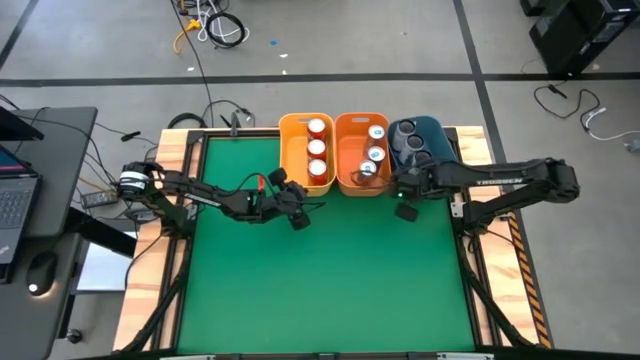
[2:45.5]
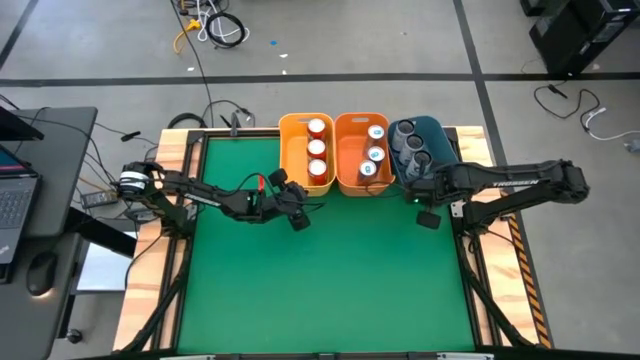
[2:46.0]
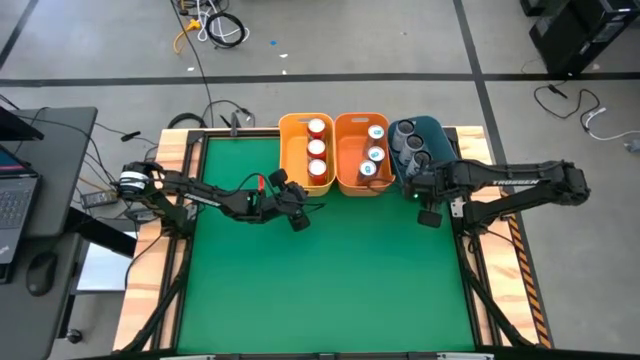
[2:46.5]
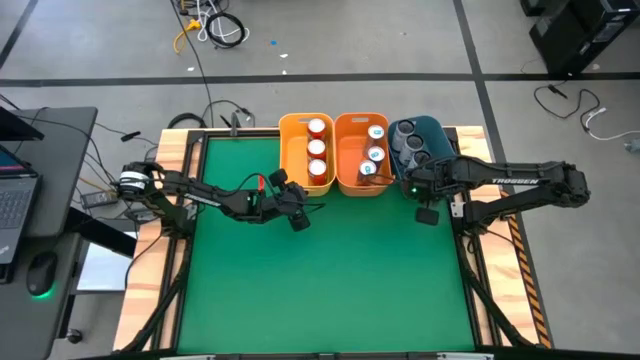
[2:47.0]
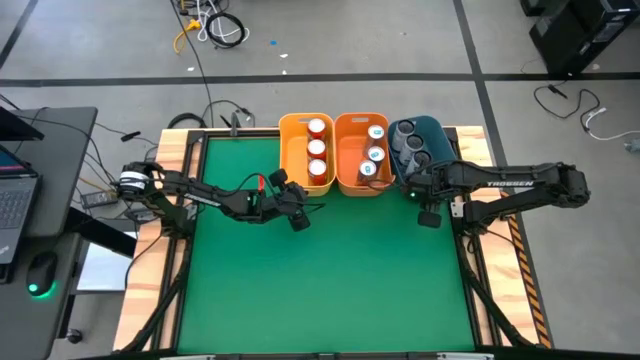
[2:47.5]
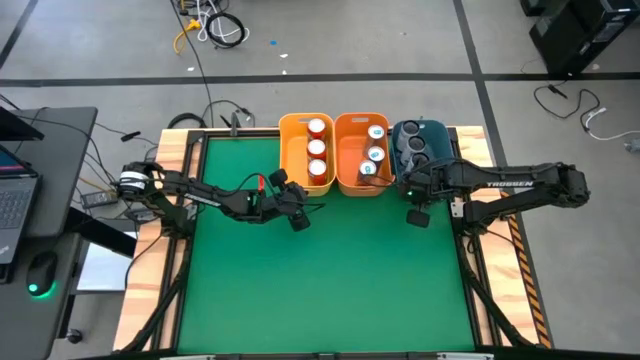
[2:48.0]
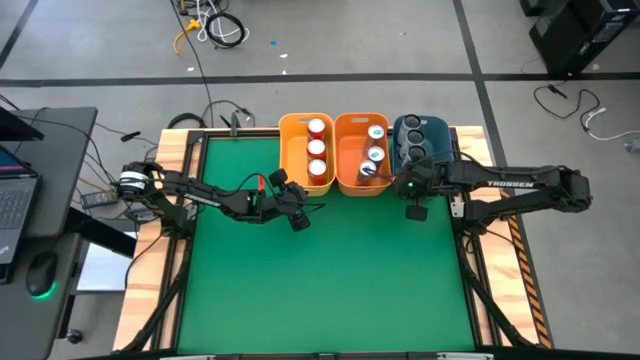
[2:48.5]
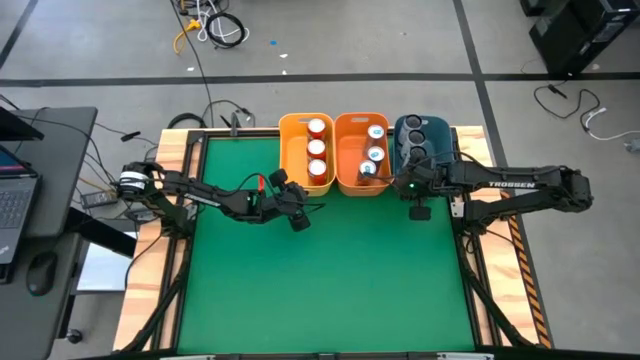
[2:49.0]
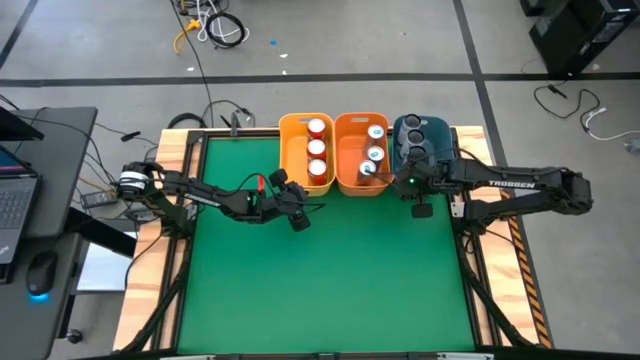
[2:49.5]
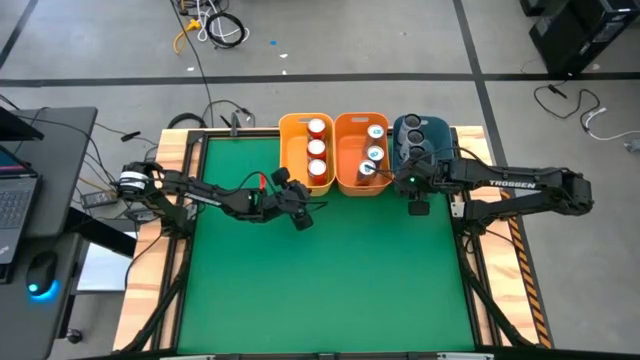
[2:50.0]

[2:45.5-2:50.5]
Task: Sort soda cans
Adjust the blue bin

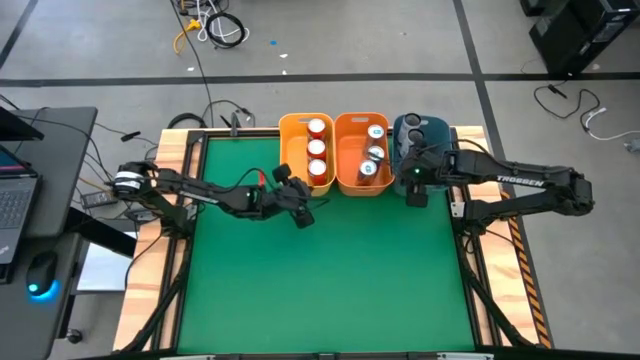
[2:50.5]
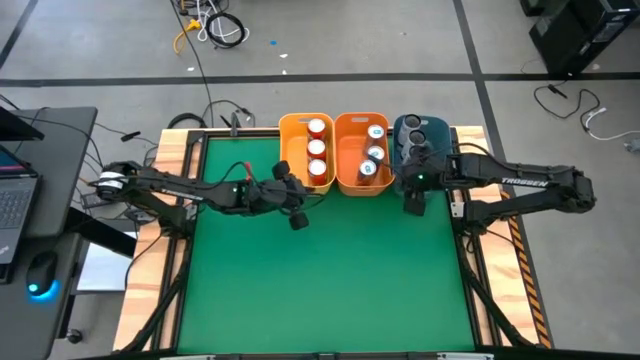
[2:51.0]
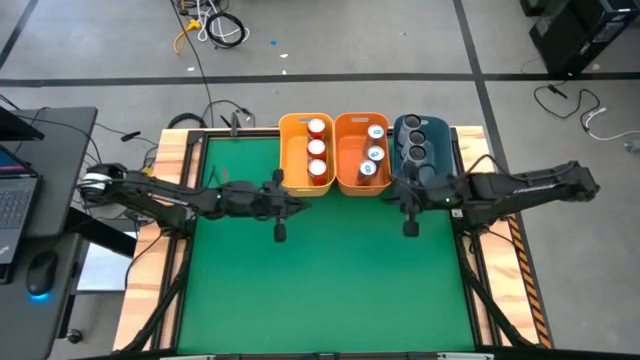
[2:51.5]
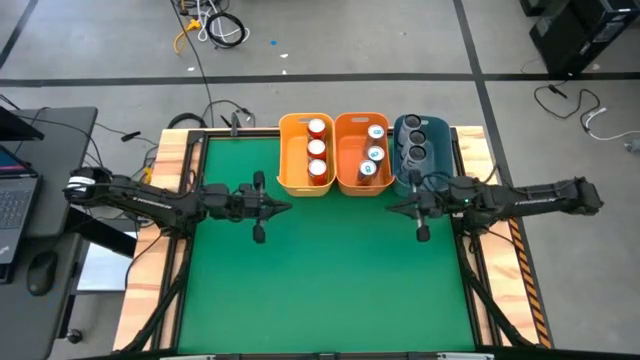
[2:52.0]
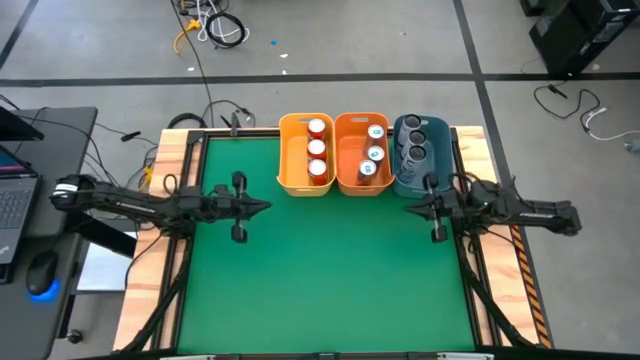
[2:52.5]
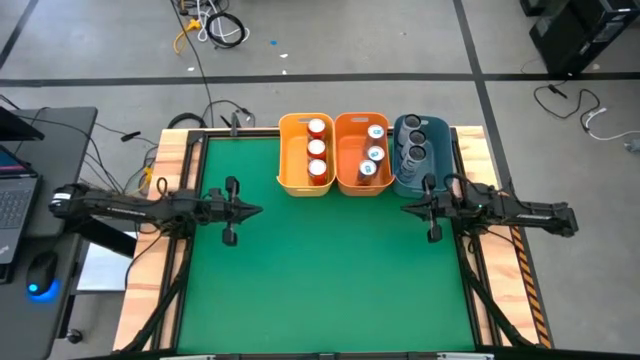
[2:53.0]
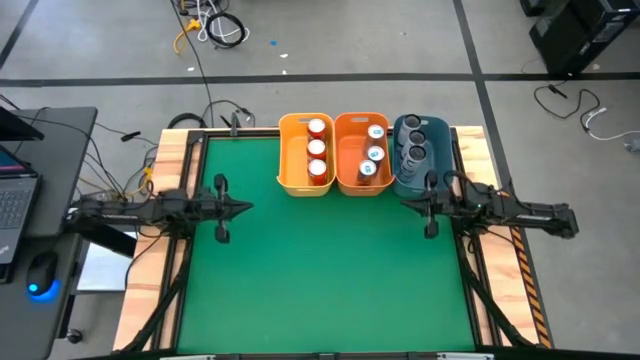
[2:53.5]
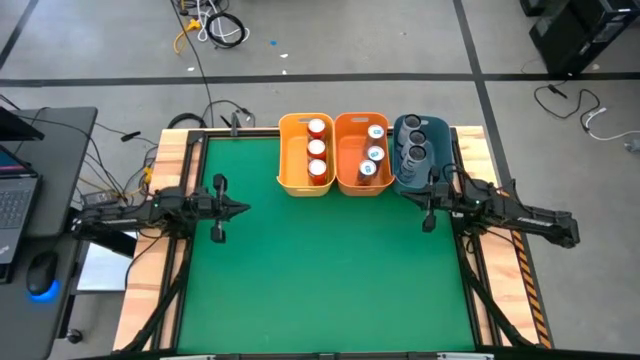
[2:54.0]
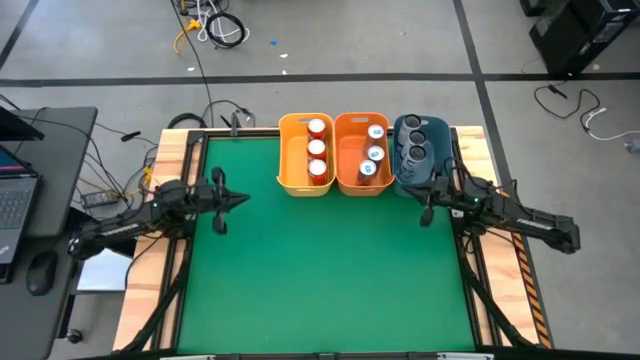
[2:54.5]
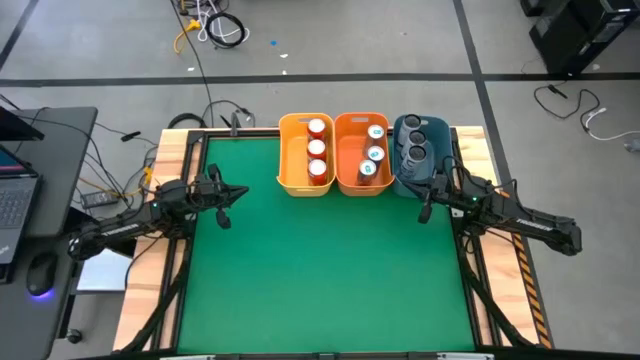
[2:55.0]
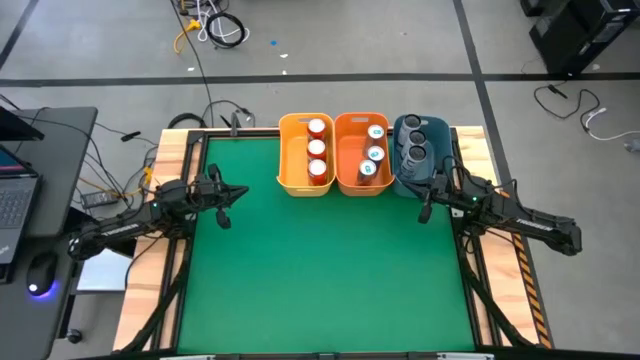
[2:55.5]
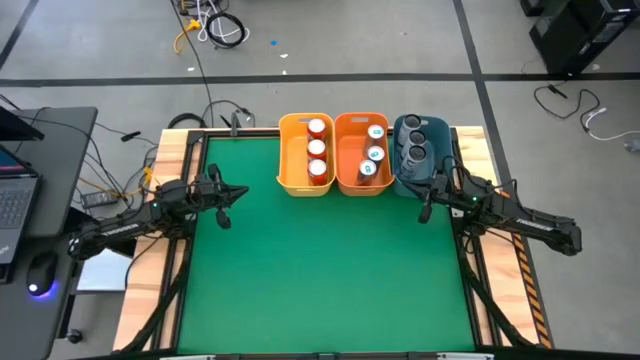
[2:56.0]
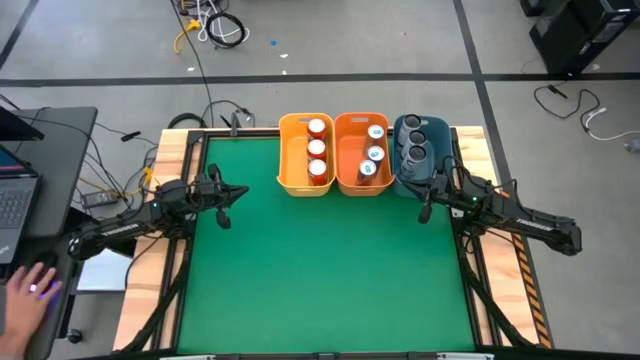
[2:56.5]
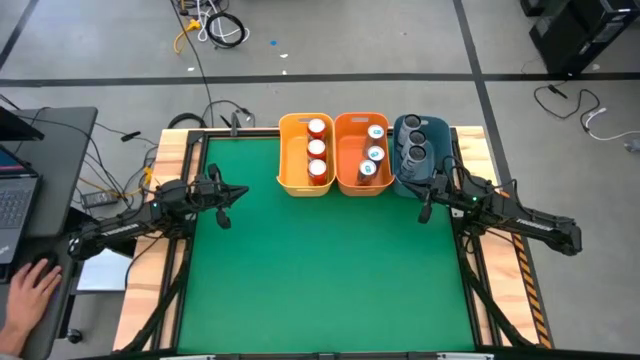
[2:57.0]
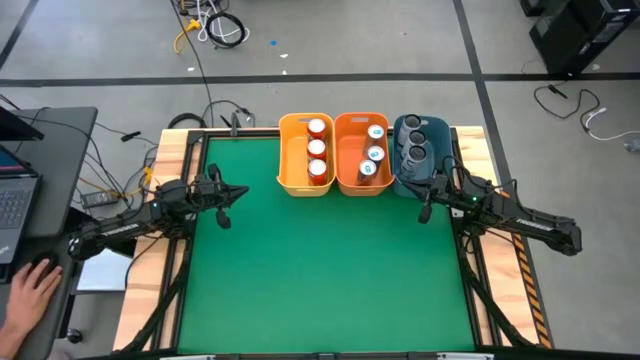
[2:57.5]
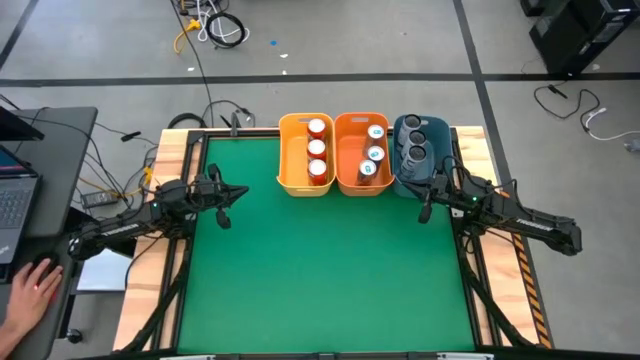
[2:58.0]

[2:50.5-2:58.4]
Return to Home Position

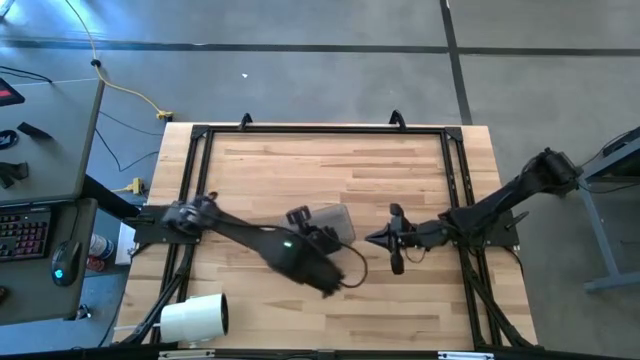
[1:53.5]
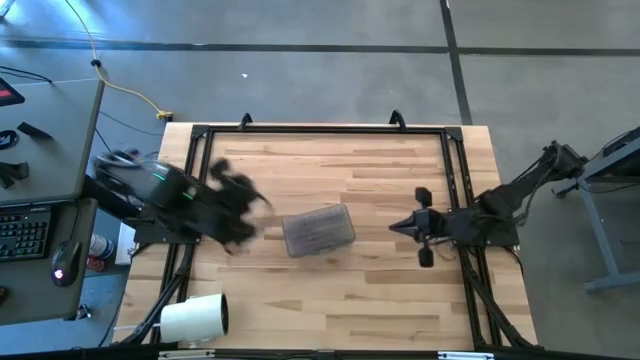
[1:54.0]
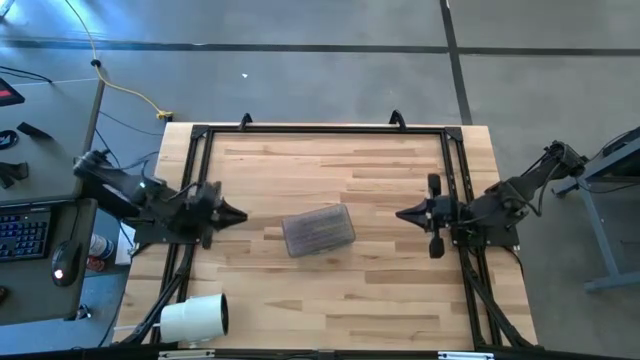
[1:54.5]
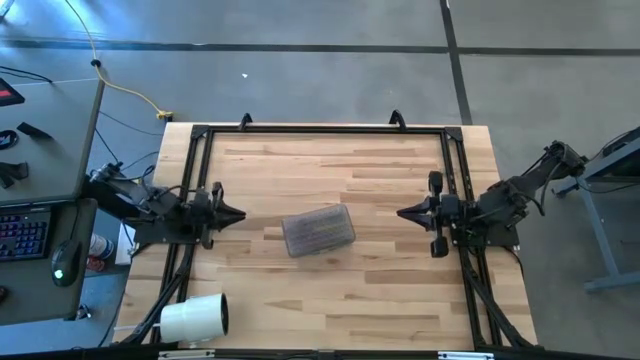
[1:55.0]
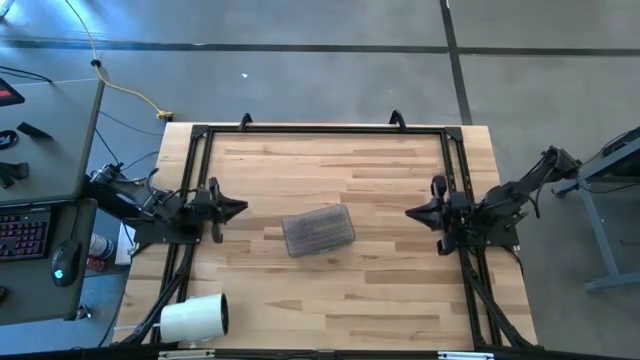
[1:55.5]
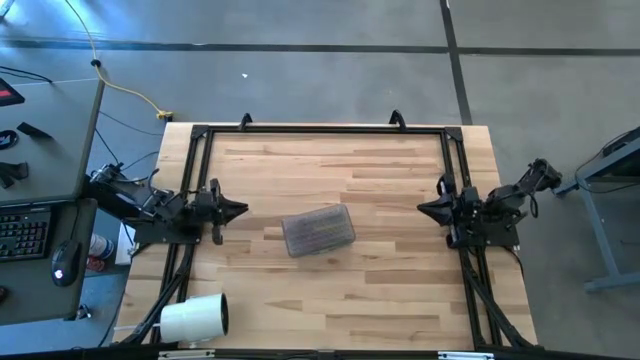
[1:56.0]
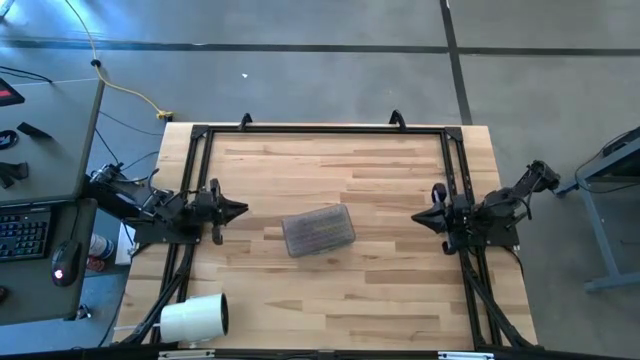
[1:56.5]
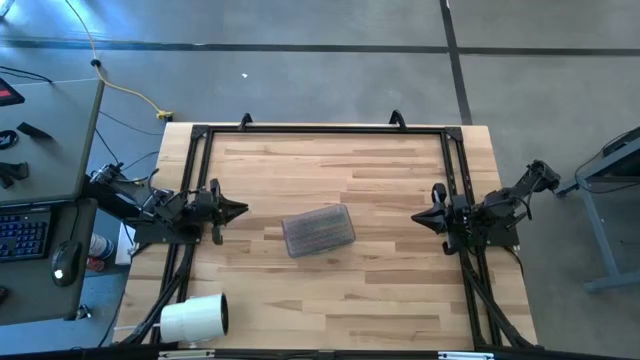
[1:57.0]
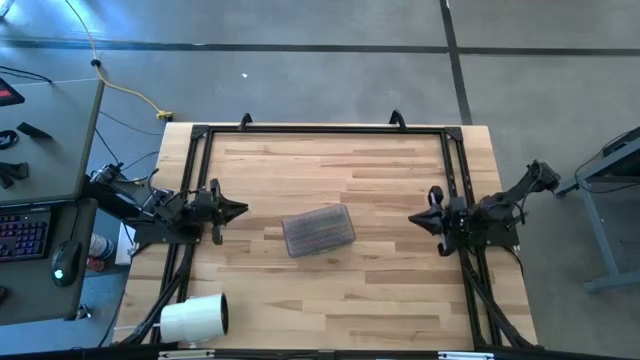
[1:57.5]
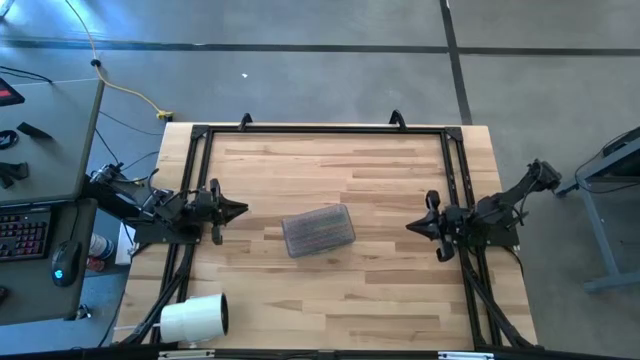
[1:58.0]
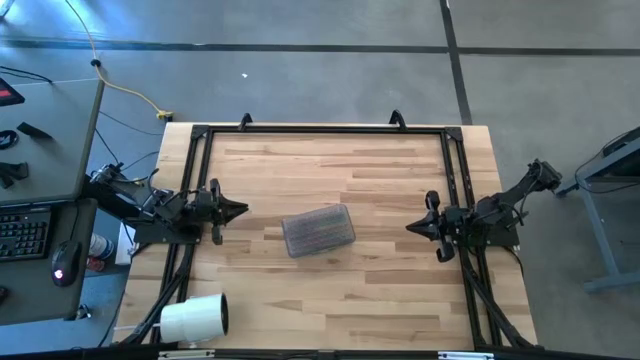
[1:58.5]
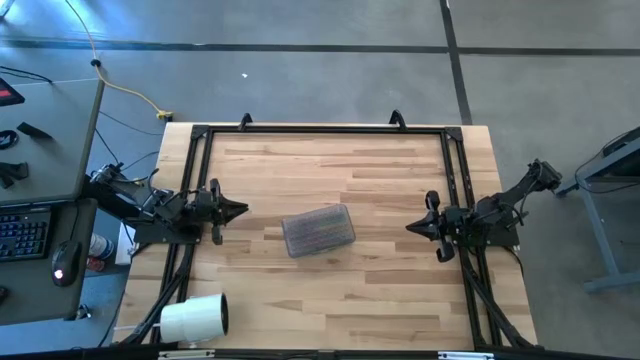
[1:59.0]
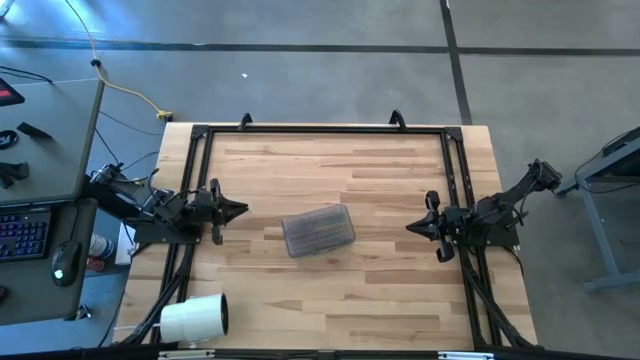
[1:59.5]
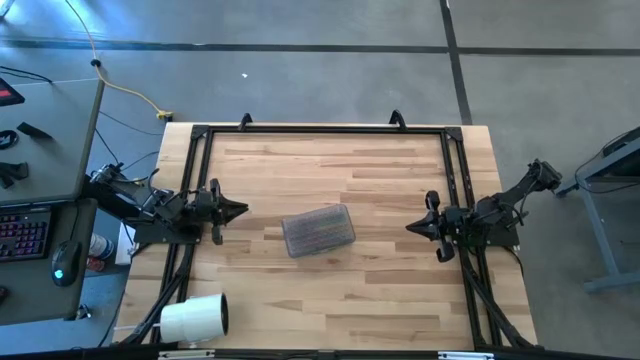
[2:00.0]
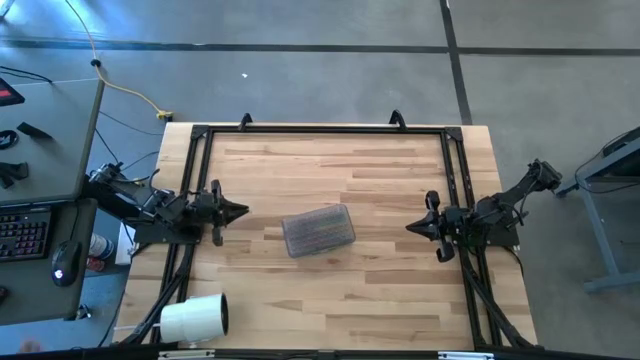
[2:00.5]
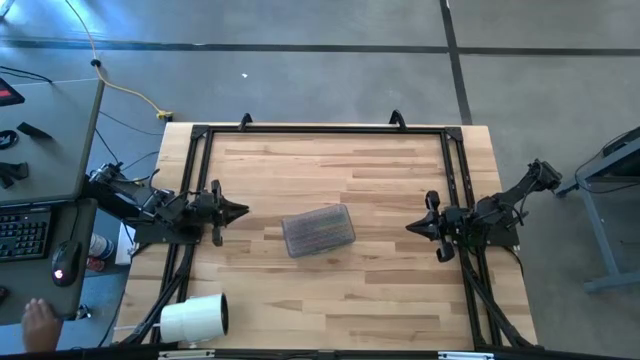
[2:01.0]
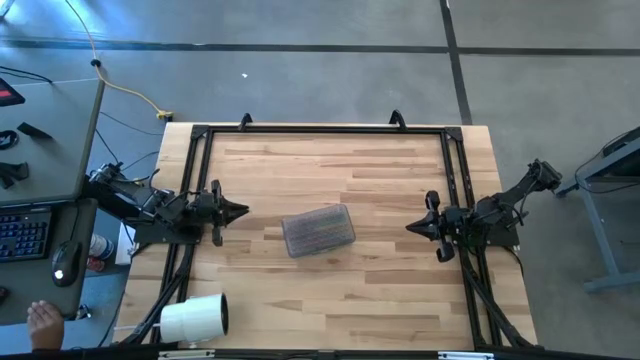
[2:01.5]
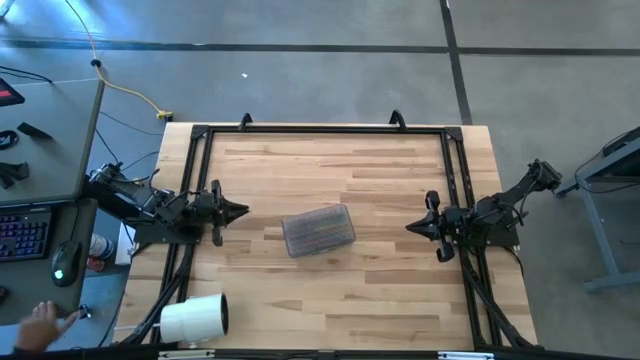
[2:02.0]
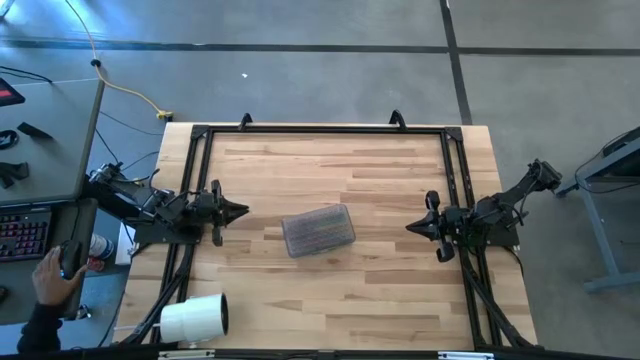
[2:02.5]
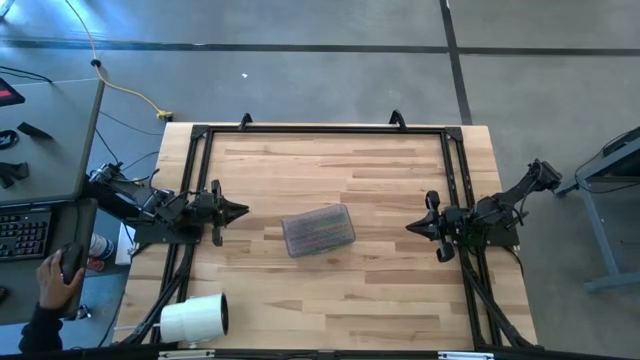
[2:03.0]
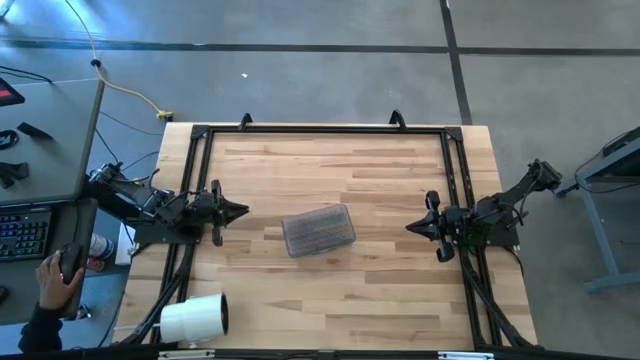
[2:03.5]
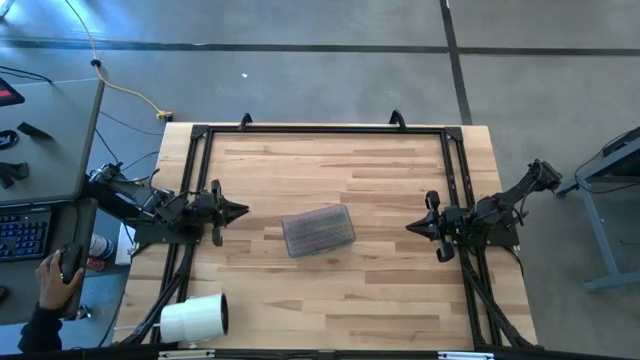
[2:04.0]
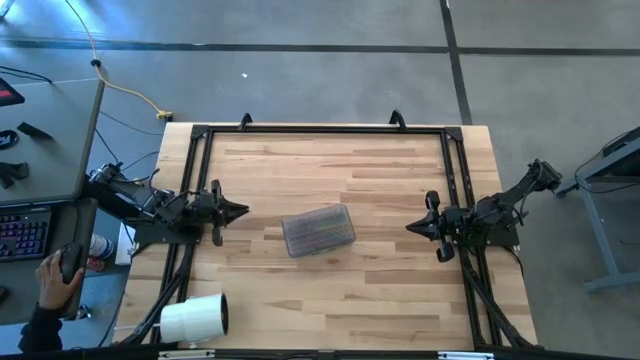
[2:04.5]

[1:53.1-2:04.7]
Task: Pick & place school supplies into a supply box
Return to Home Position
